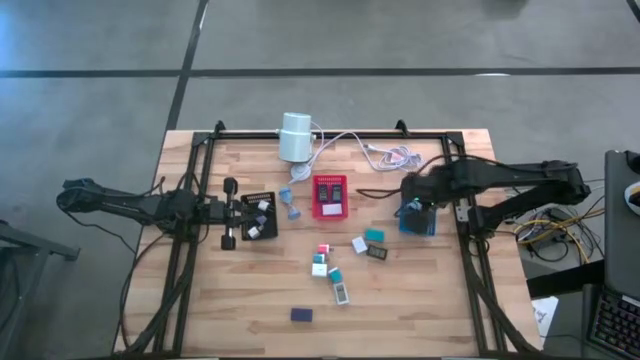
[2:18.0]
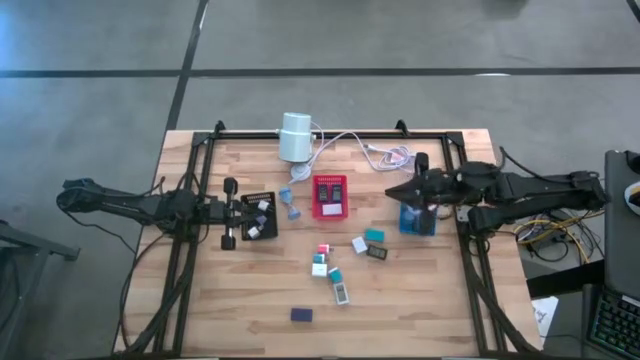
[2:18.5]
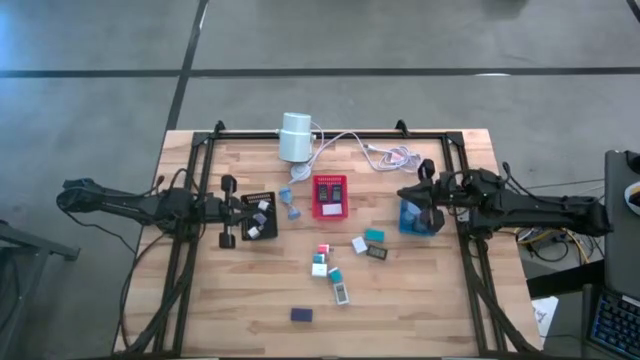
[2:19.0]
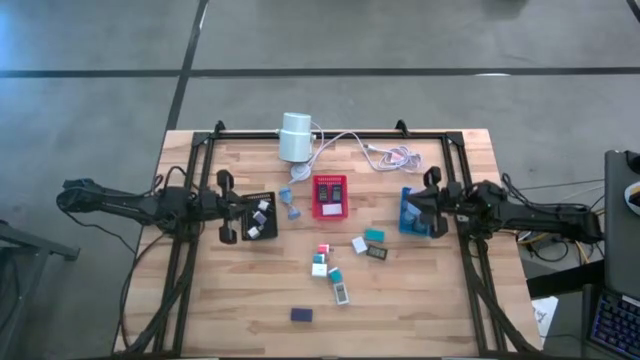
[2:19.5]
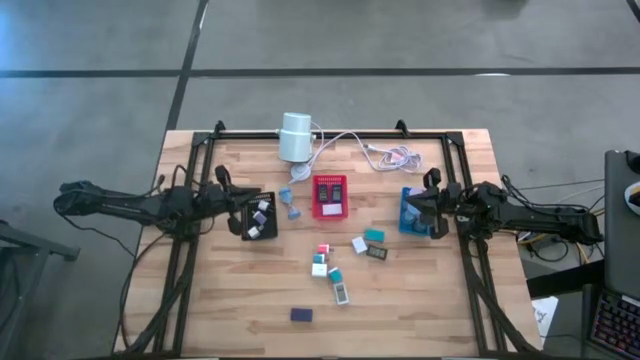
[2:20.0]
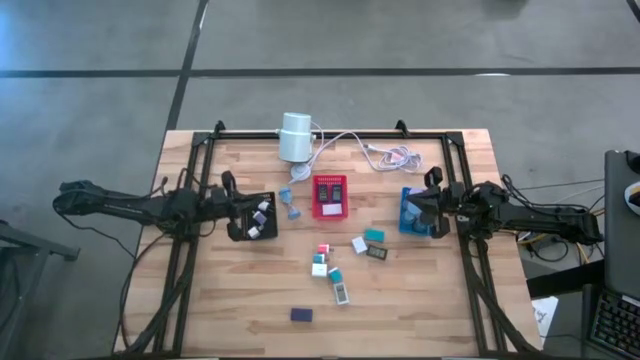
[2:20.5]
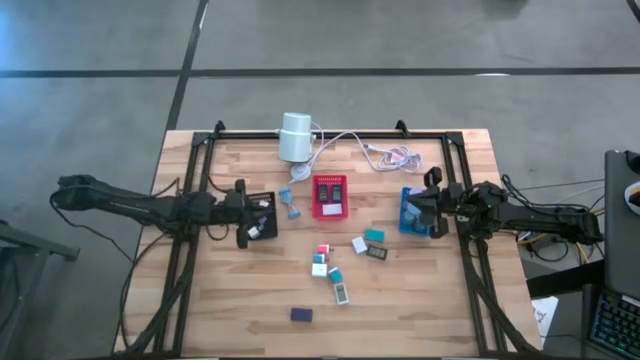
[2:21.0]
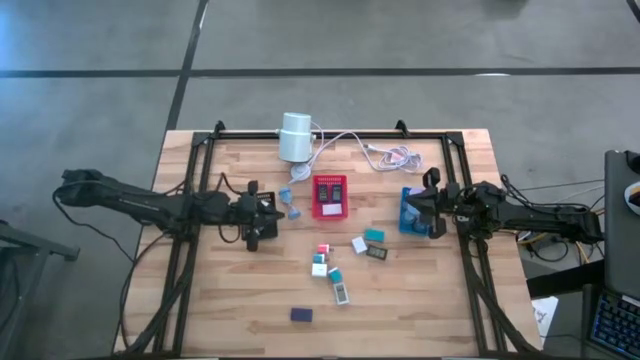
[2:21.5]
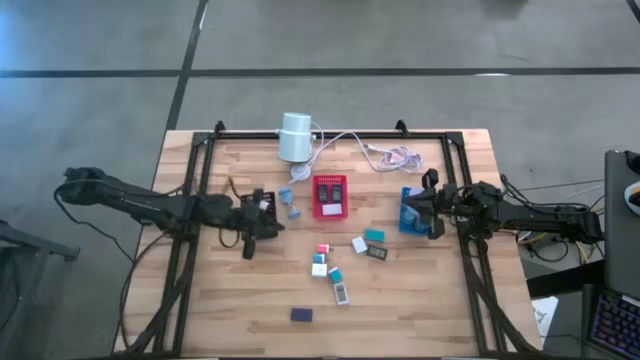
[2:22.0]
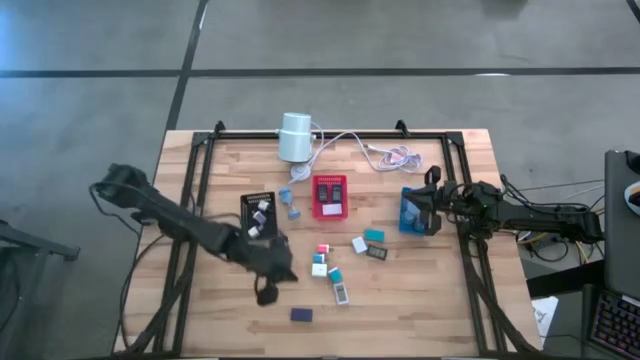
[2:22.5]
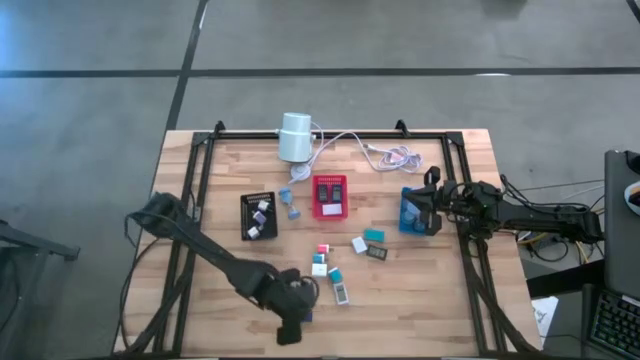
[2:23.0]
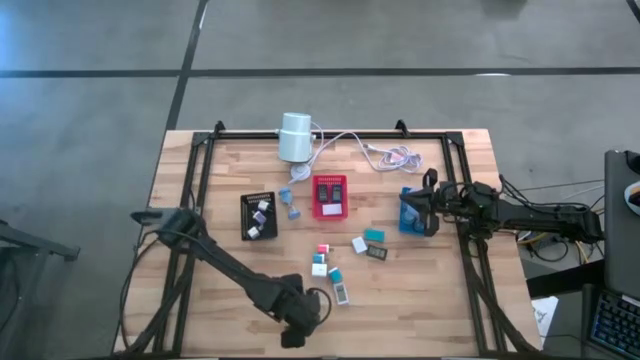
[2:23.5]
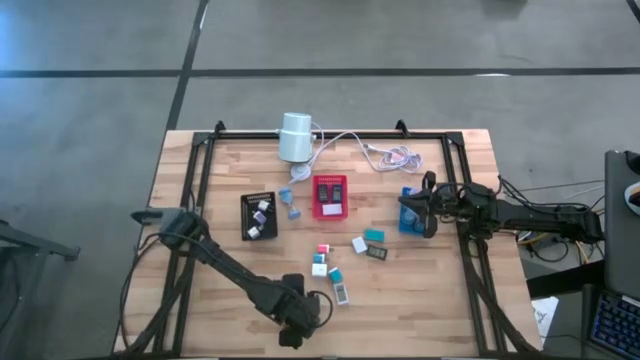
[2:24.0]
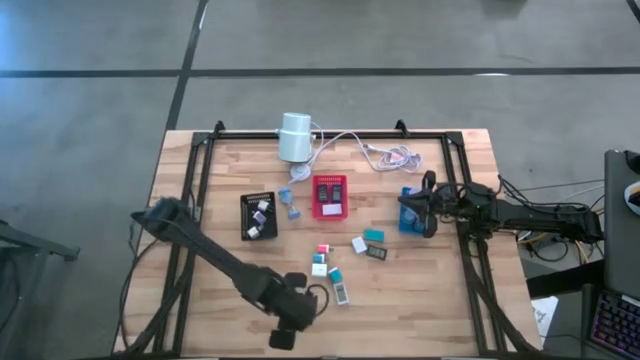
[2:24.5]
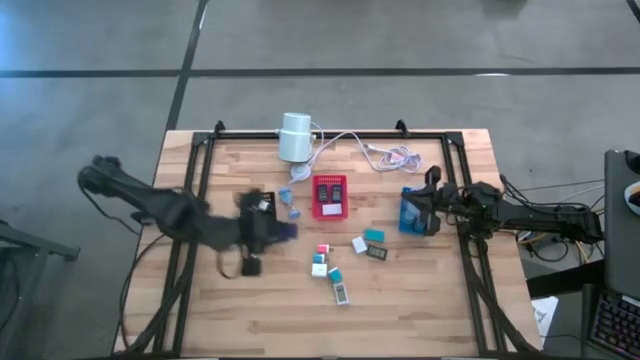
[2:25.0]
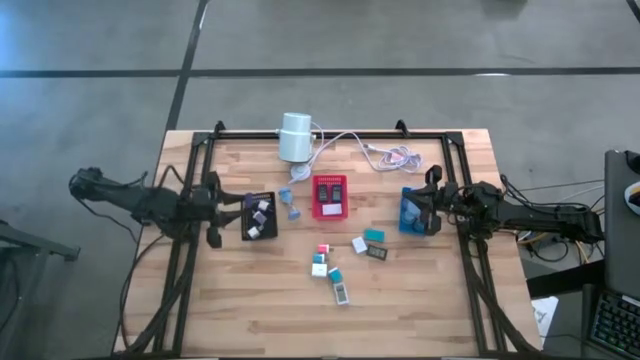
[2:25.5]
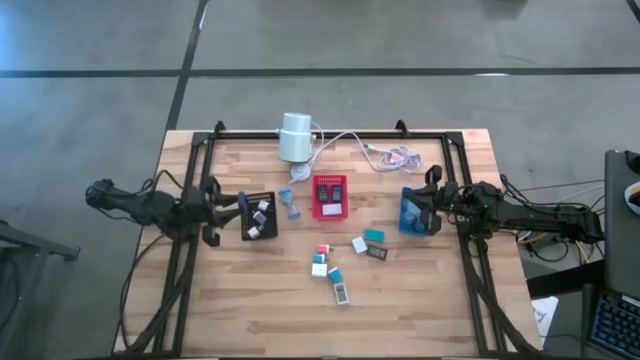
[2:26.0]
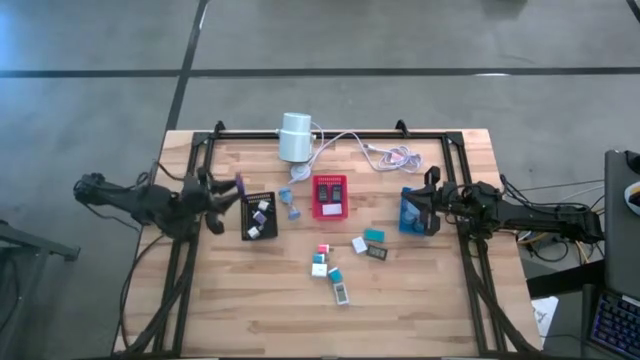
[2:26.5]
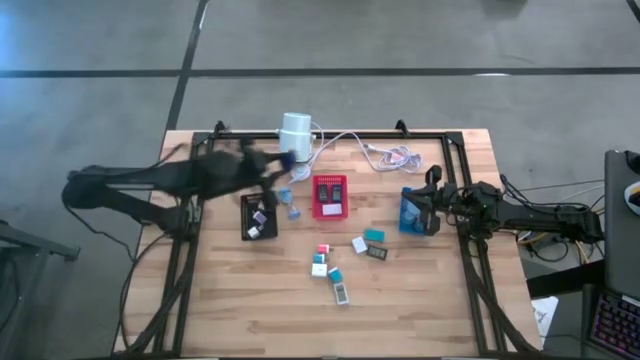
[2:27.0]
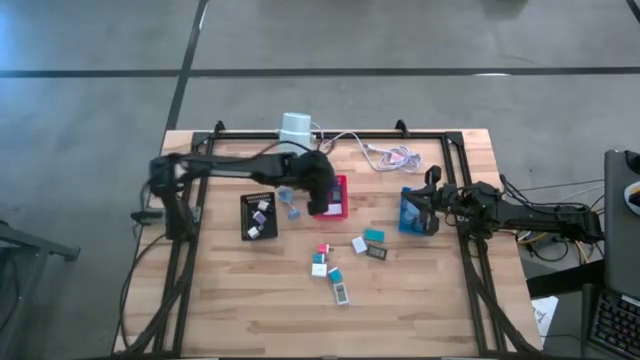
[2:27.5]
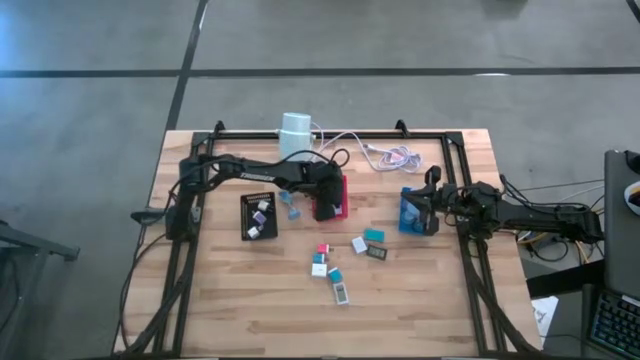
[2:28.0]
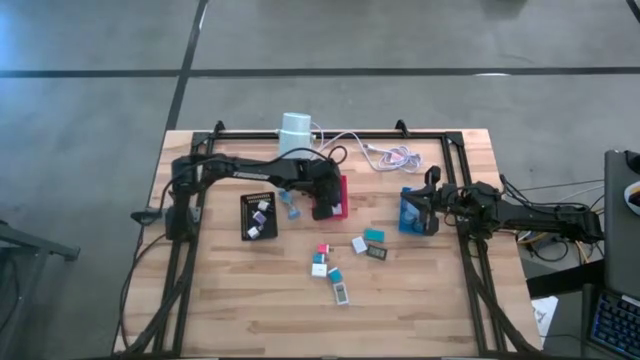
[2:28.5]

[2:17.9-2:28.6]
Task: Pick & Place Office items
Put the dark blue digital clock into the red basket

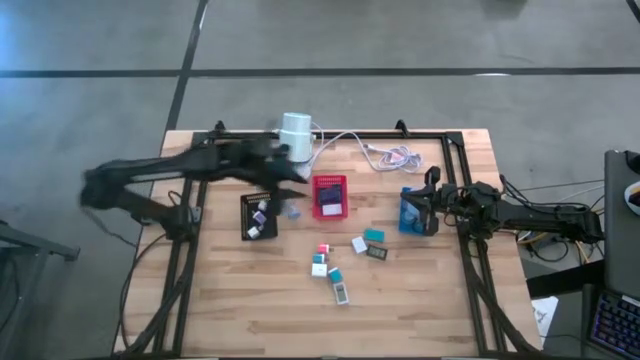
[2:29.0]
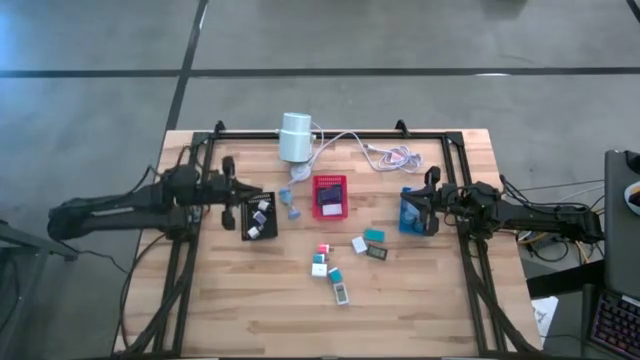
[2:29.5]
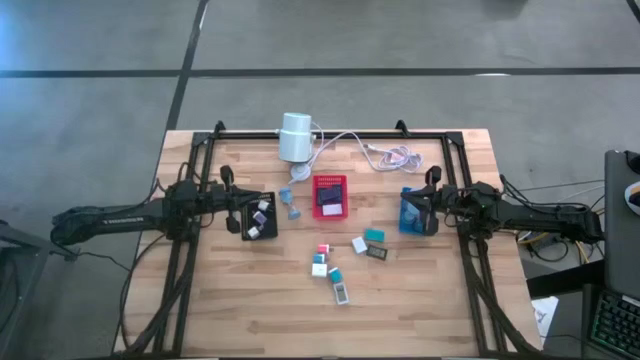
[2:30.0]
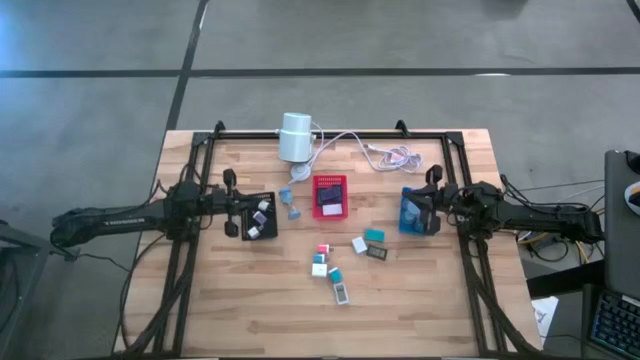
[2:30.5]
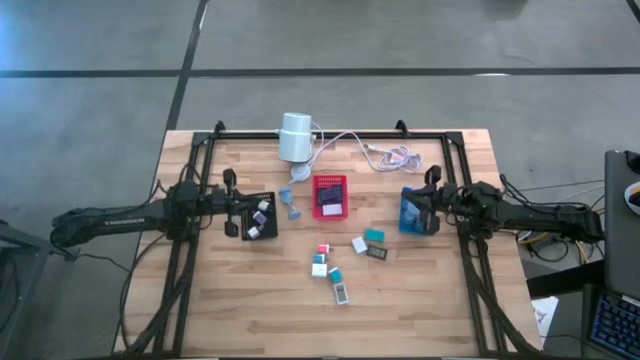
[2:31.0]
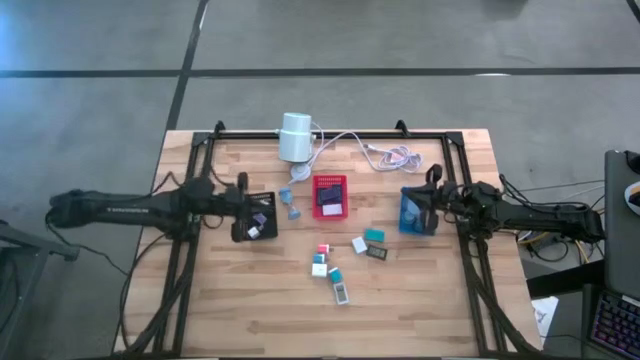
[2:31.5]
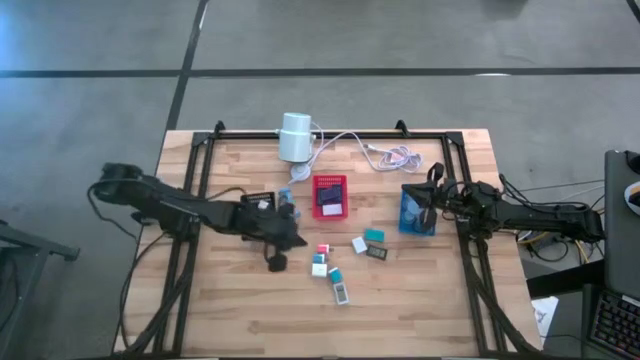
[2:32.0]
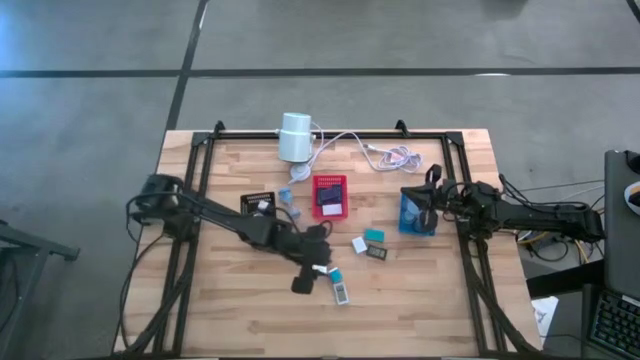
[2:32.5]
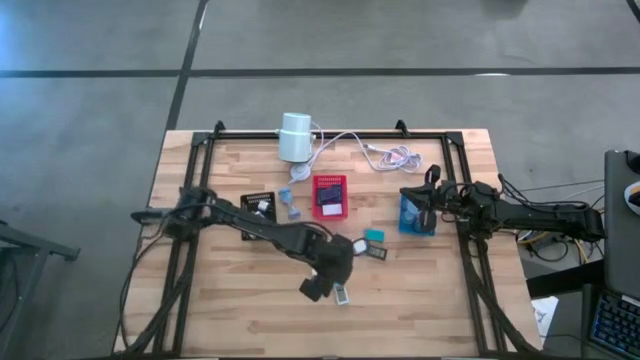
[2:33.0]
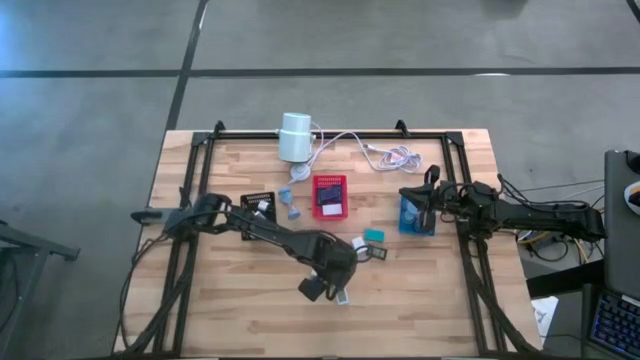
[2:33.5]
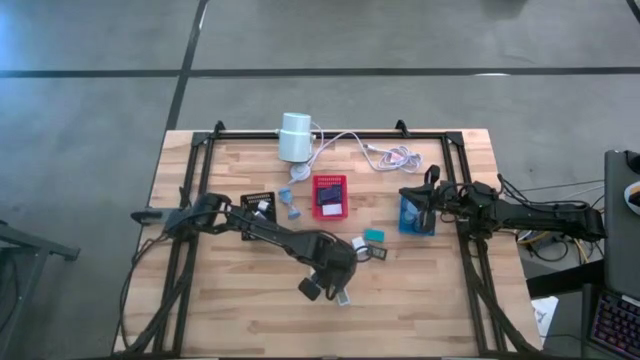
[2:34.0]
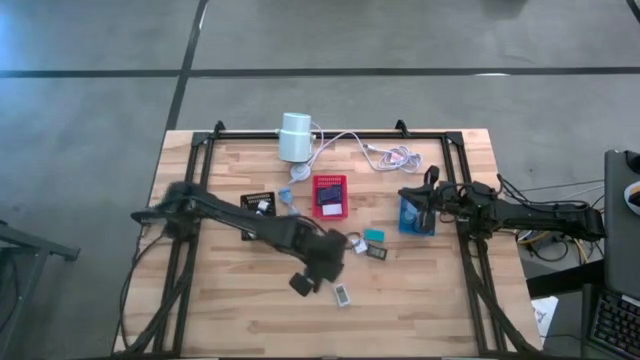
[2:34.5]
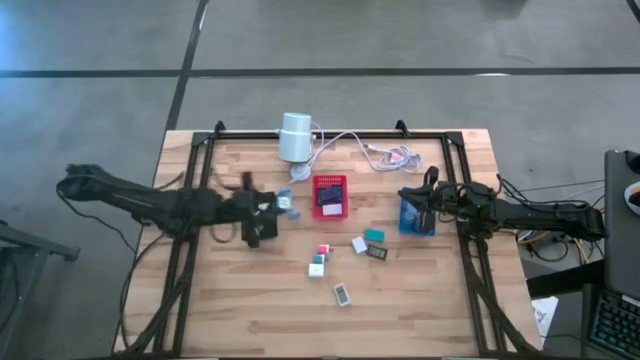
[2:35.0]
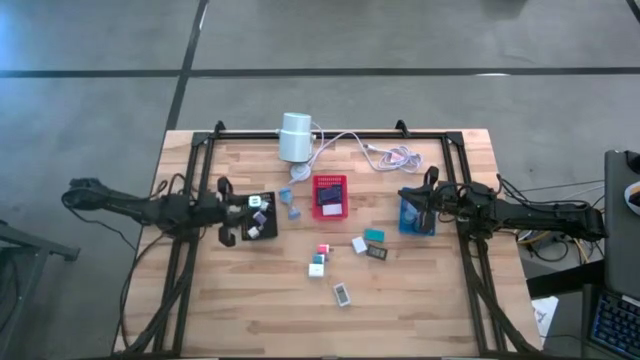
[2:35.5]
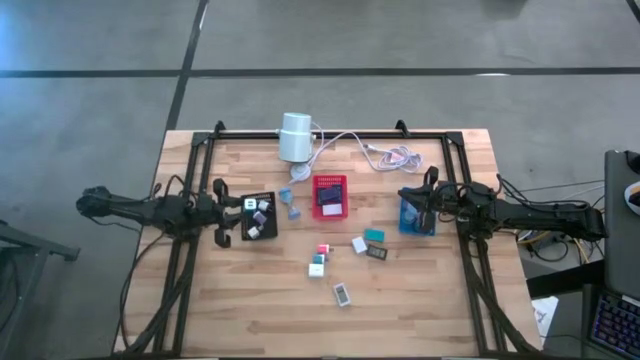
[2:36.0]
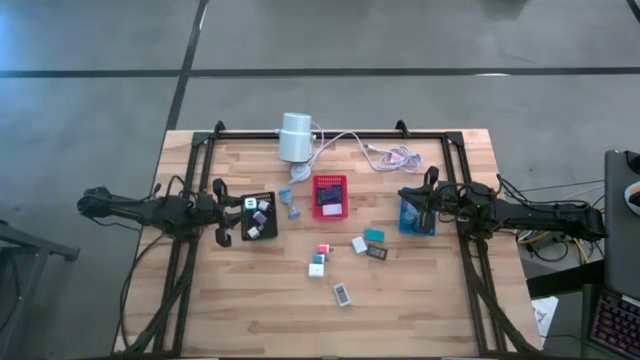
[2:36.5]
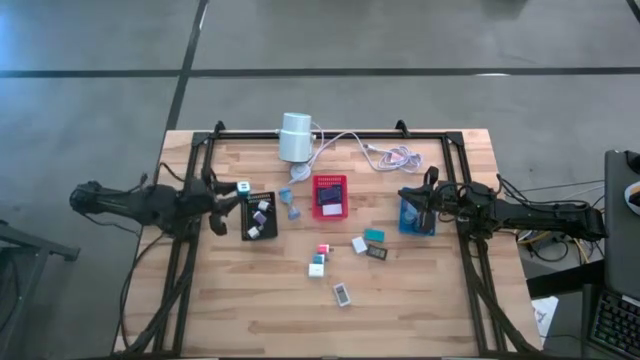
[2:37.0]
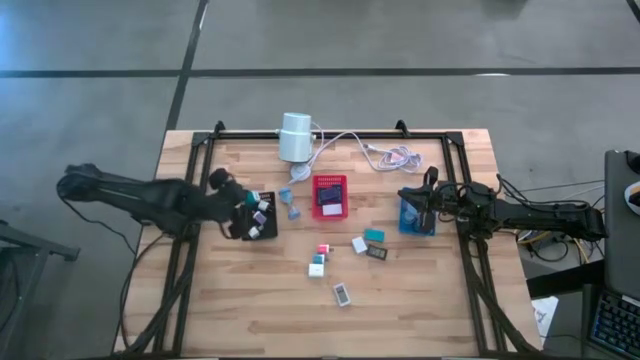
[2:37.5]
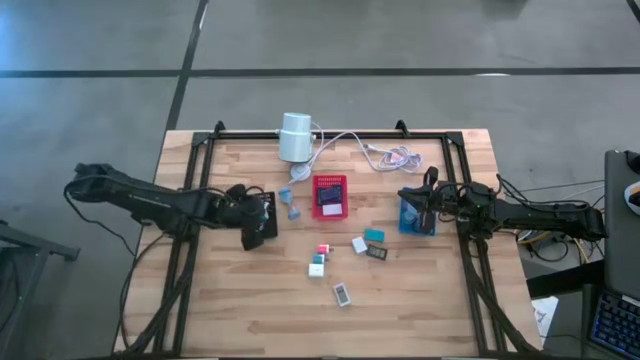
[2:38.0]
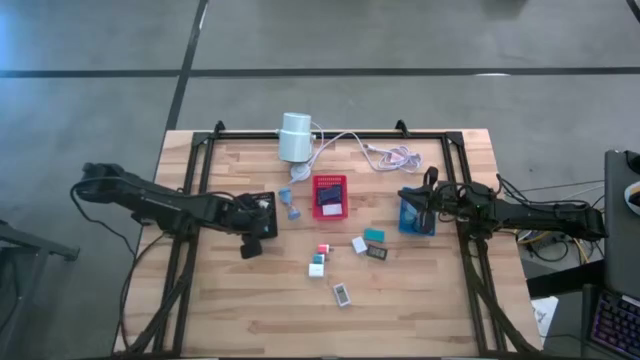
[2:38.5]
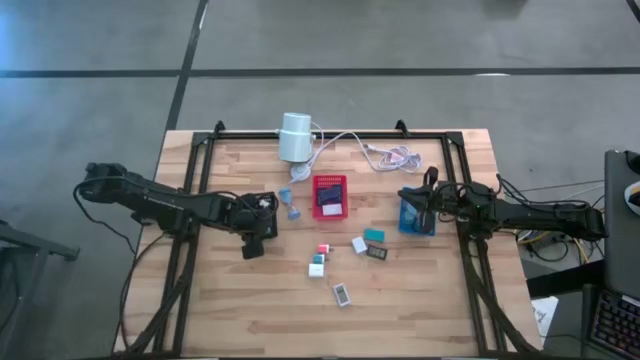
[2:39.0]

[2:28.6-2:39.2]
Put the bottom blue charger adapter into the black basket
